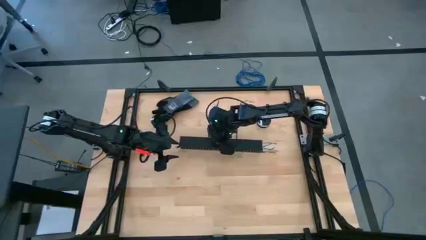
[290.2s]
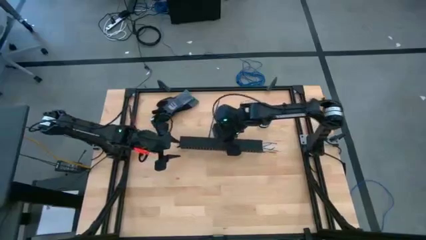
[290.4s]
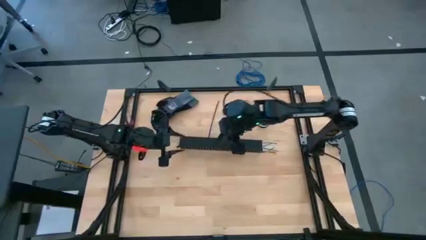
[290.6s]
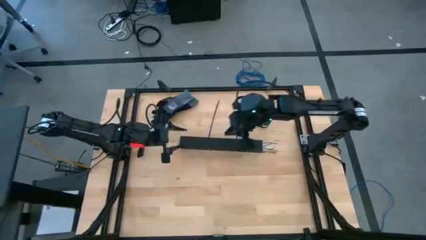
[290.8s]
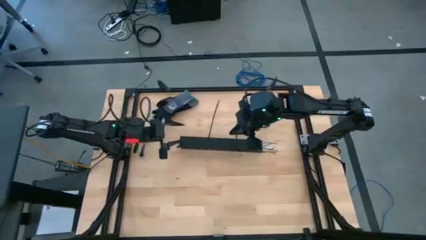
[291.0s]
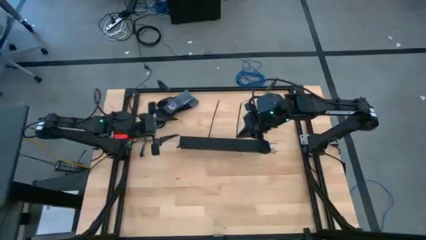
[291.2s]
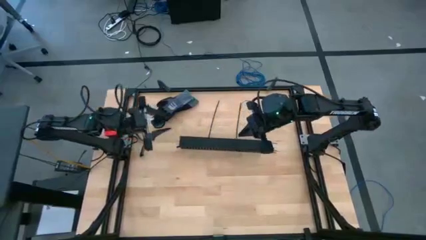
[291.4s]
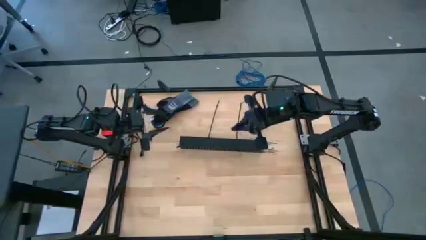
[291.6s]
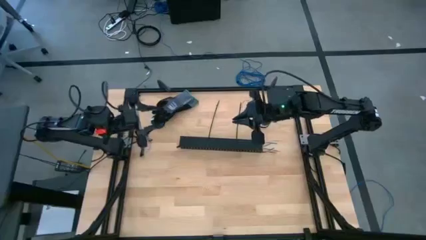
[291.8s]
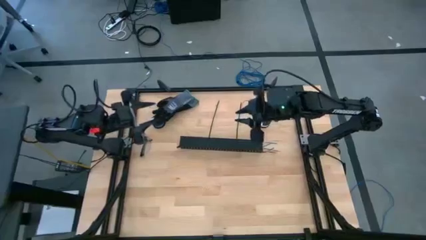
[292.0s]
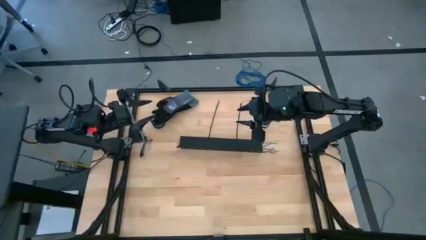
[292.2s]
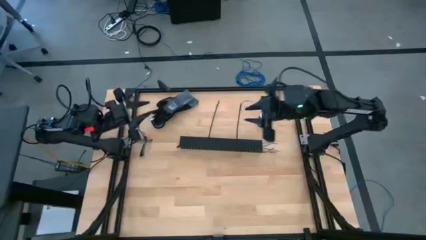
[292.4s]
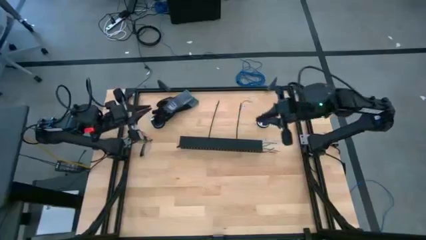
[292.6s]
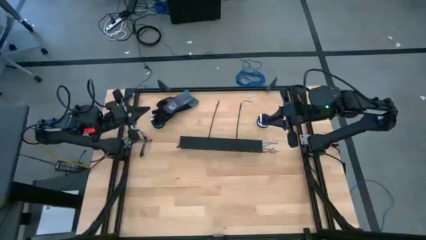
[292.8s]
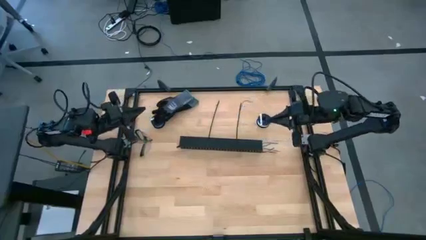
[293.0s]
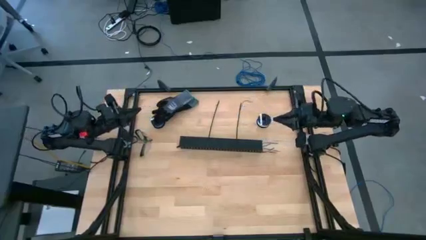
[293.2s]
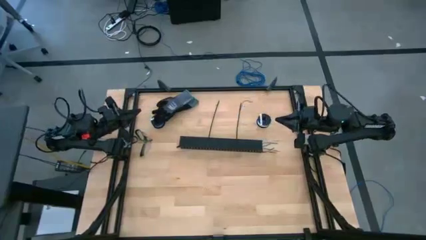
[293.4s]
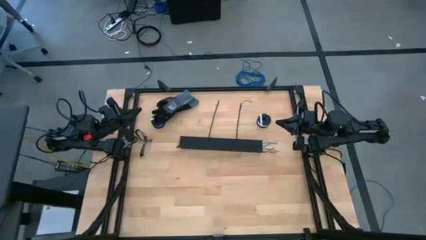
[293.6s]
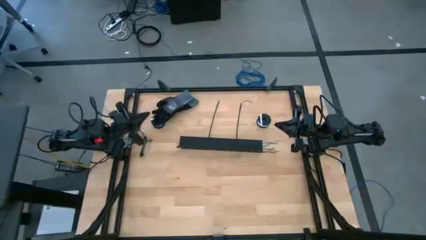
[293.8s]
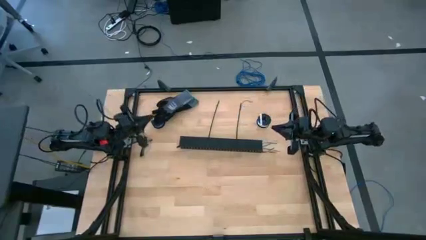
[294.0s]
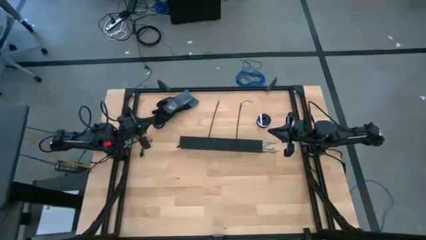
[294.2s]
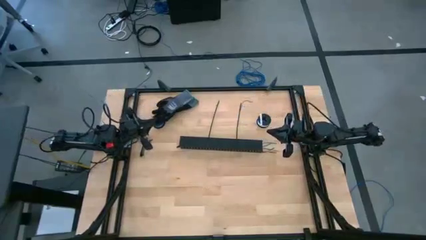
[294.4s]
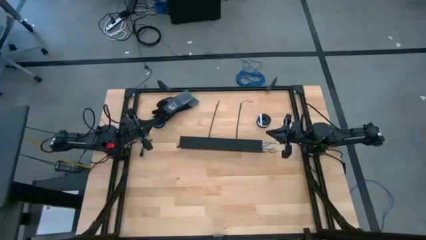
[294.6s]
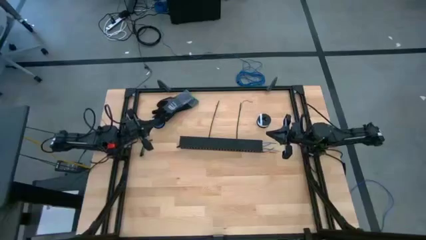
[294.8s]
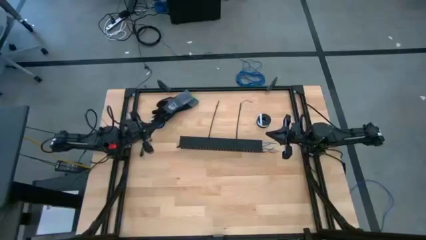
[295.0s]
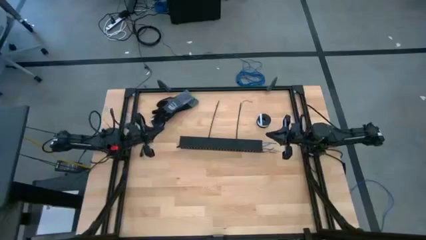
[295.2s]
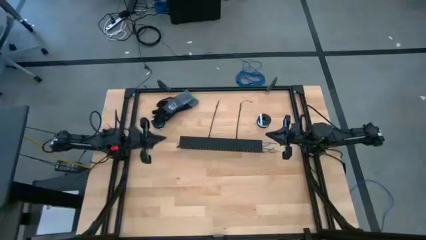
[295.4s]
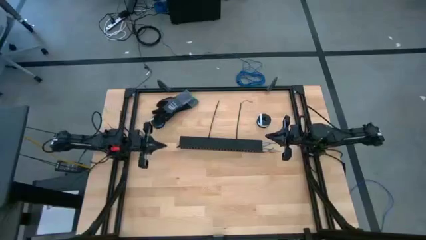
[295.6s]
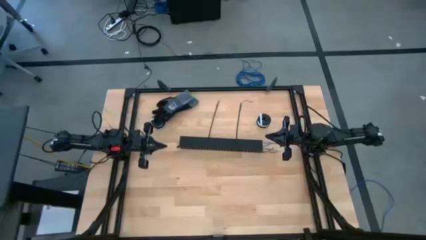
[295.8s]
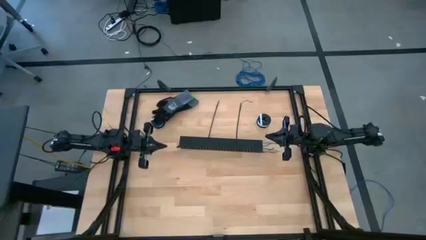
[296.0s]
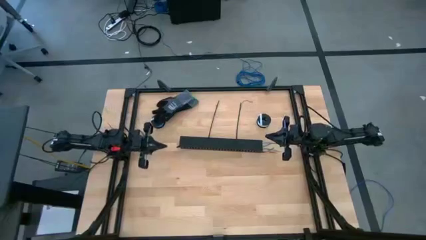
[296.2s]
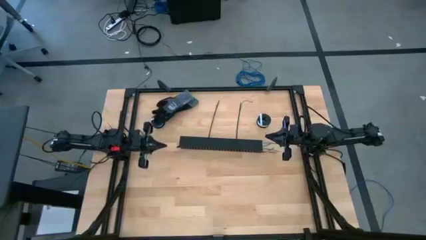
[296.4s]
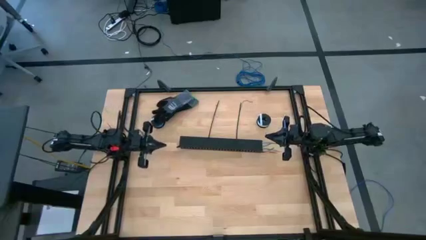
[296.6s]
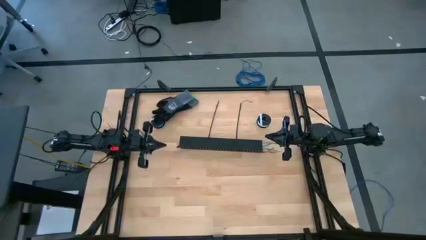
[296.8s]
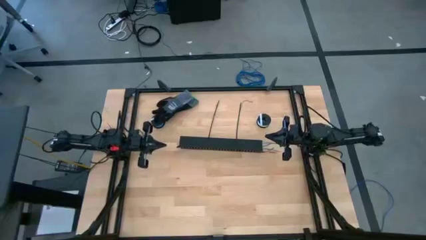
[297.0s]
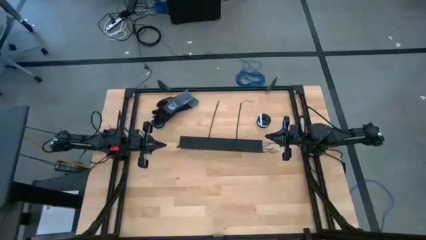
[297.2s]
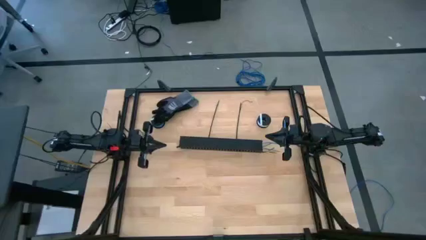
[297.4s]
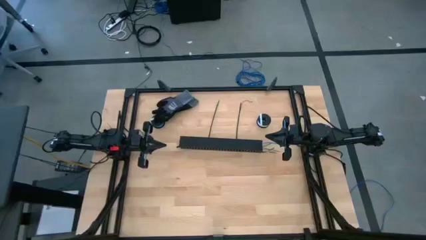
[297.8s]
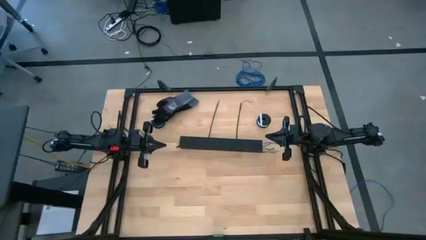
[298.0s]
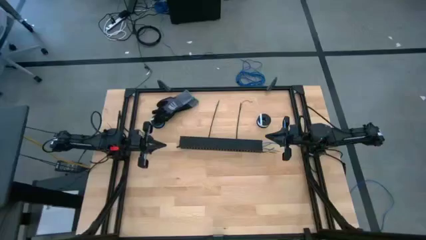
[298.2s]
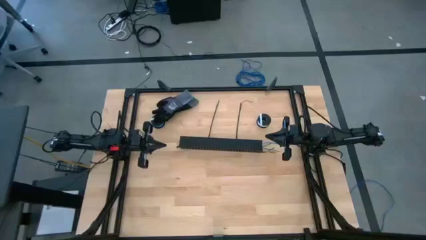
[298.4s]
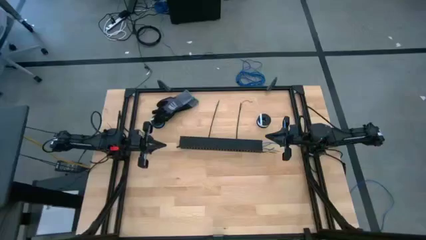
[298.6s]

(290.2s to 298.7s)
Task: Ziptie cables
Return to Home Position

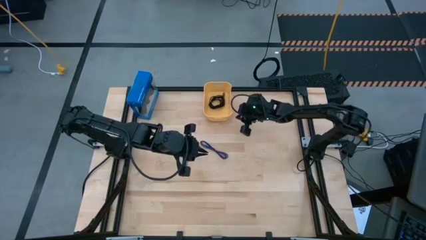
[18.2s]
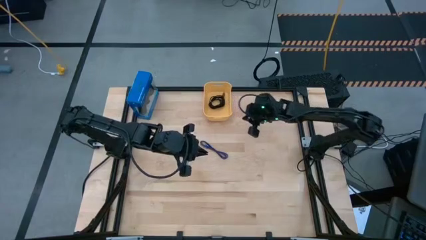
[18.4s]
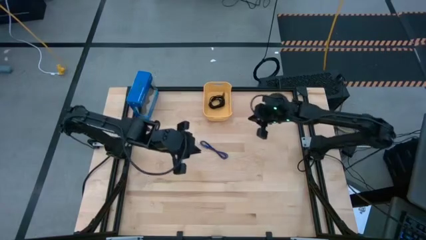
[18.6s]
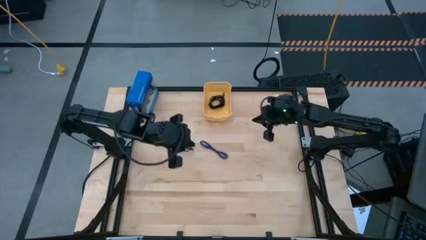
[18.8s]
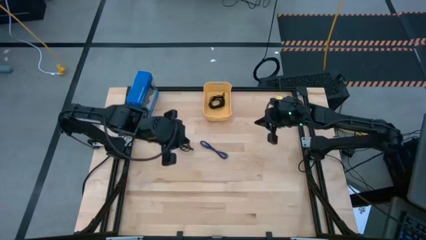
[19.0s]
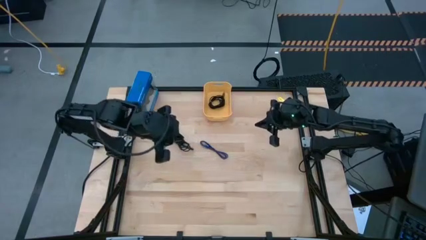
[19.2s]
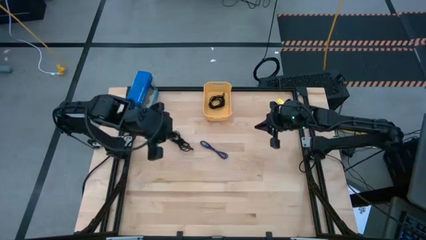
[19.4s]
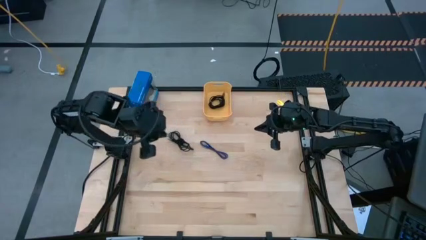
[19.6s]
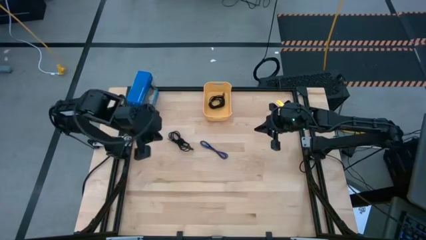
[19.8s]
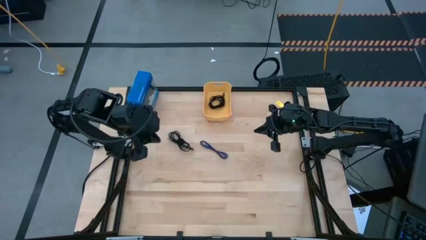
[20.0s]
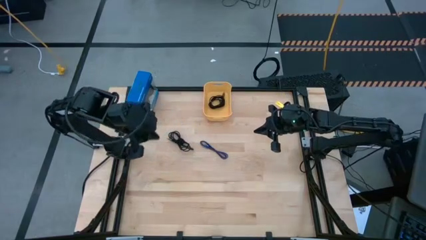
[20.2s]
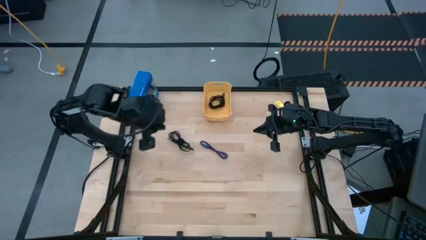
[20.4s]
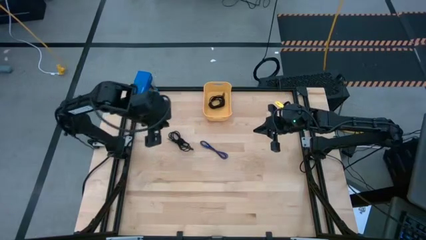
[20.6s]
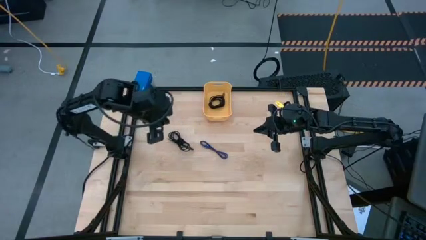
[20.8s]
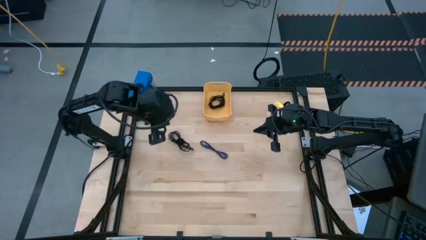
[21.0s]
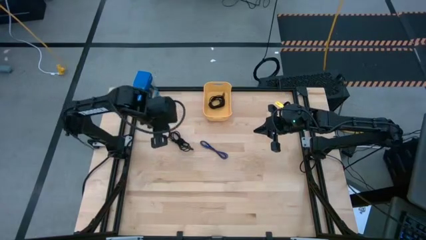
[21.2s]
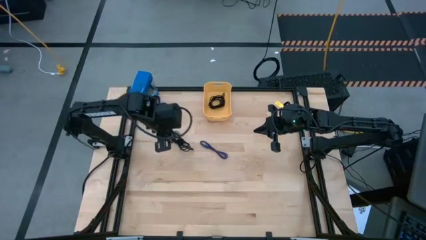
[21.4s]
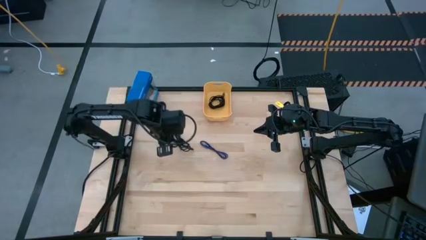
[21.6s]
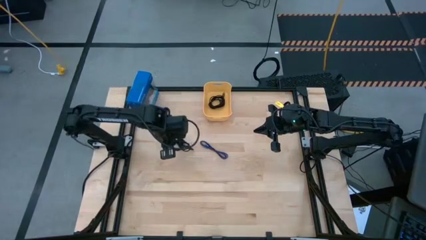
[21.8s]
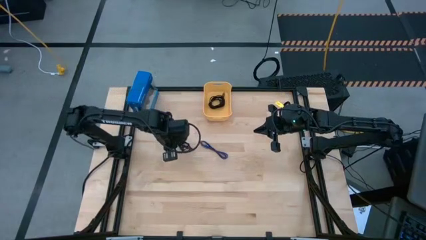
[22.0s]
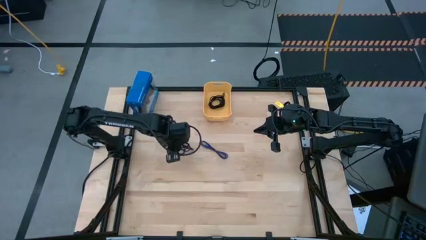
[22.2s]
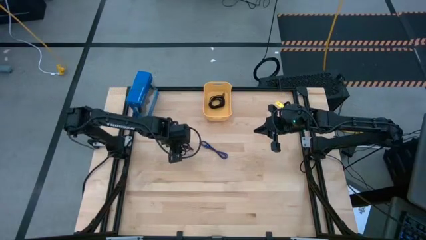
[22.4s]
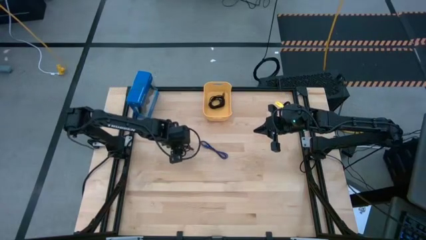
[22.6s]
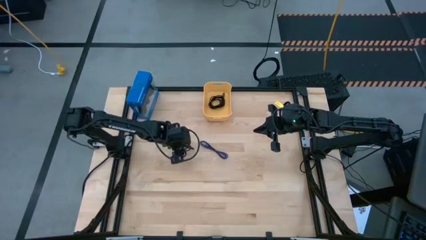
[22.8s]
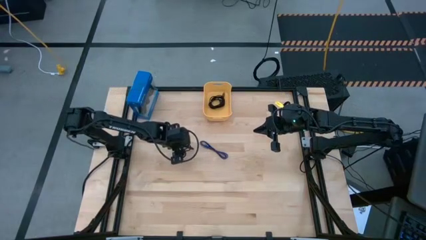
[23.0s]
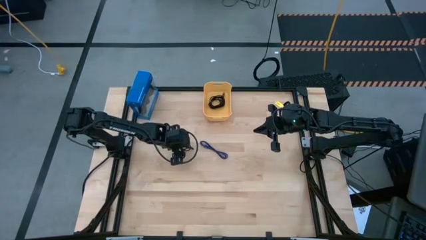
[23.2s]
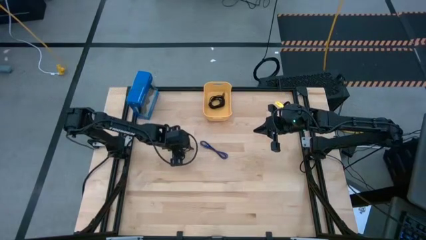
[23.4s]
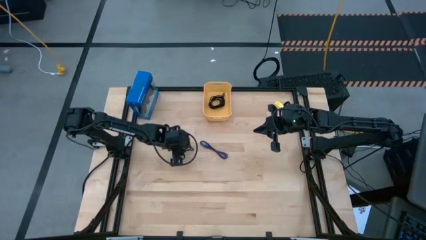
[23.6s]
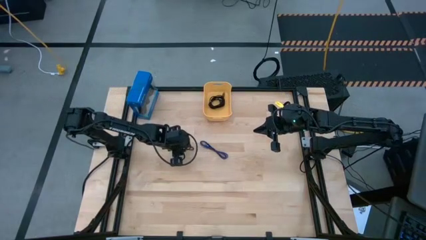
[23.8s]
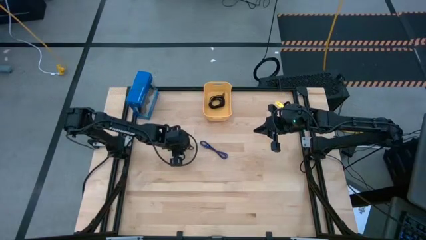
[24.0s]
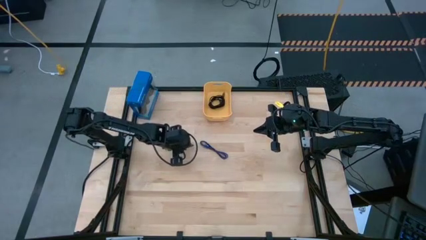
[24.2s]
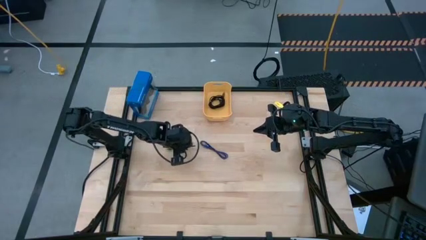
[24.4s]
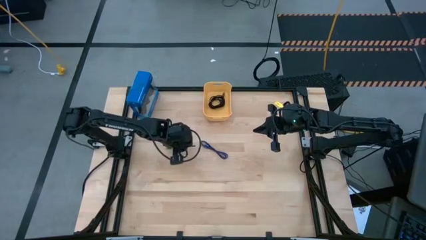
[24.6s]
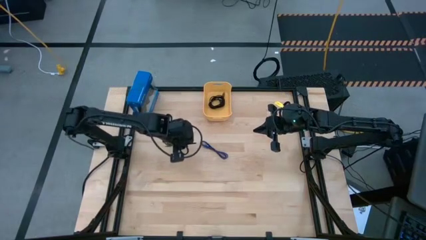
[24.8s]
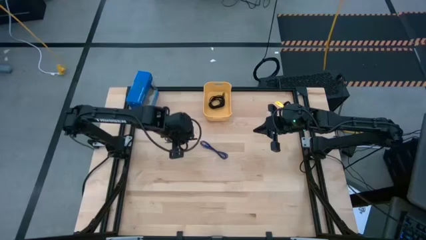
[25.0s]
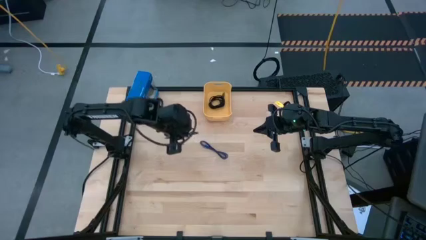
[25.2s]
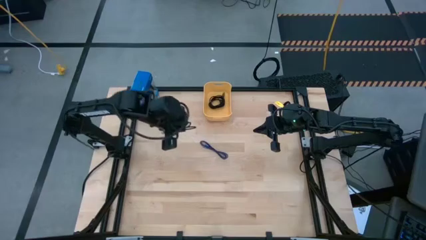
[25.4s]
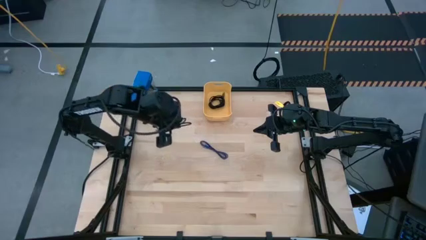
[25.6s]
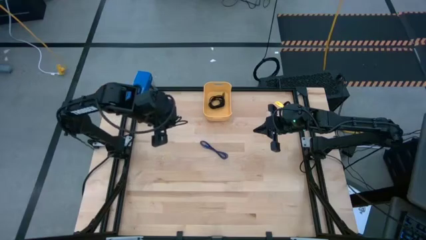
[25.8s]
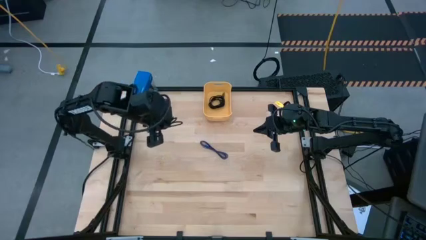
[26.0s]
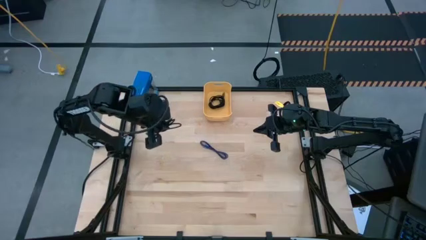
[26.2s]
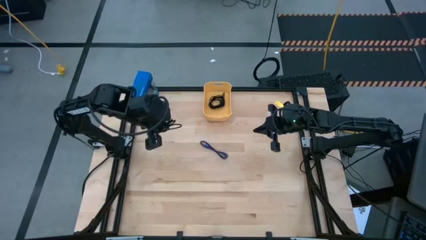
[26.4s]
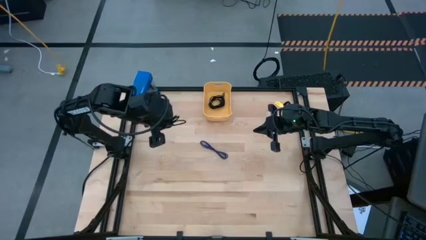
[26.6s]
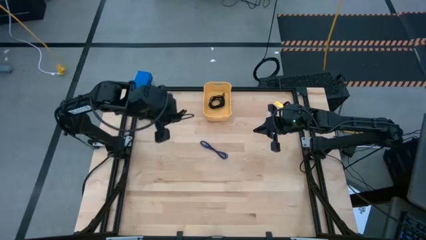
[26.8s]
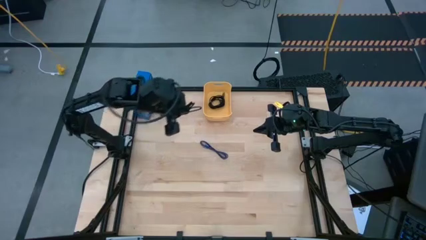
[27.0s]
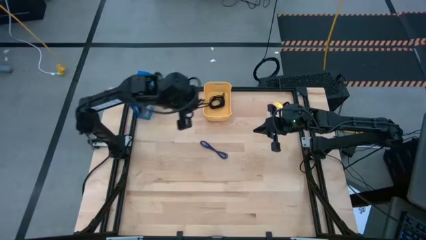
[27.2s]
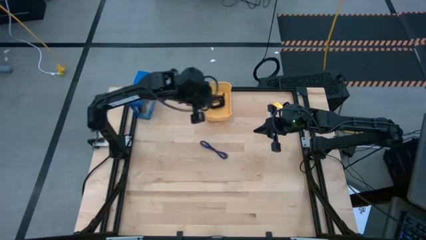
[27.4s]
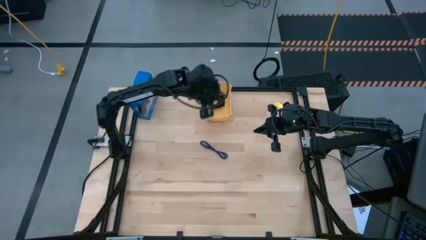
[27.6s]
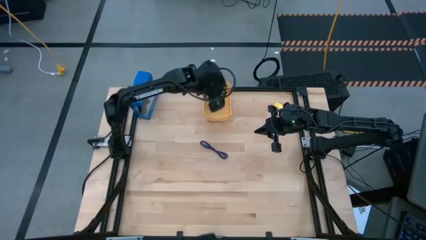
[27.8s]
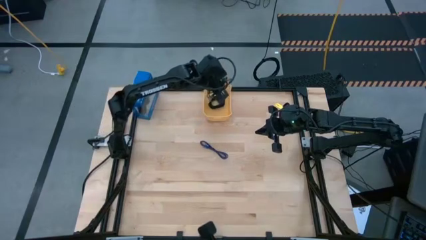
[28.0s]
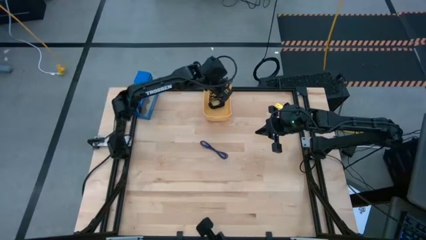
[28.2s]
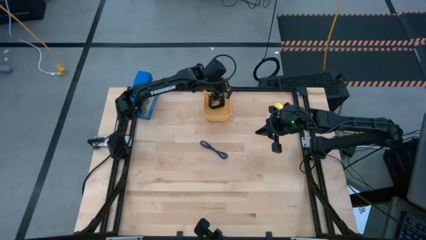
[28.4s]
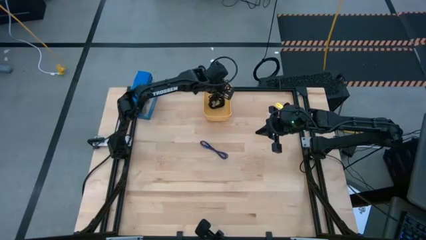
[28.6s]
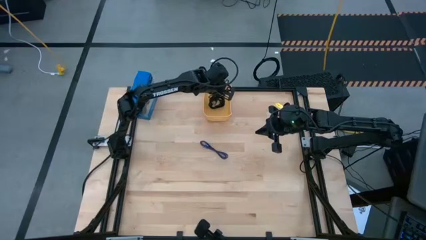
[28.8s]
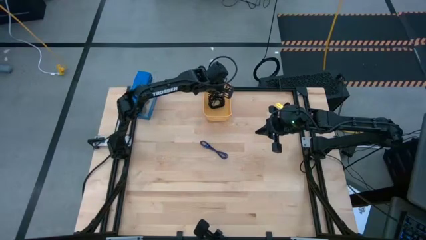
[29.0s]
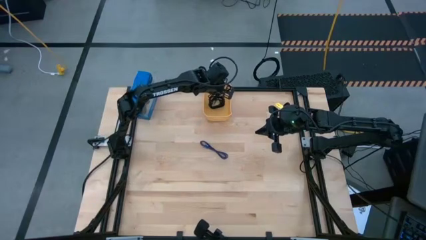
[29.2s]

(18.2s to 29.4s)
Task: Pick and place USB-C Cables
Put the black charger cable into the yellow bin
